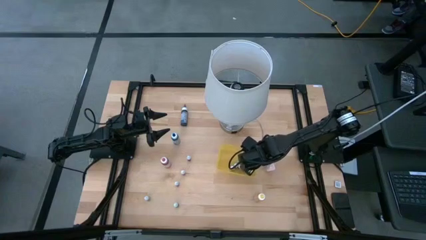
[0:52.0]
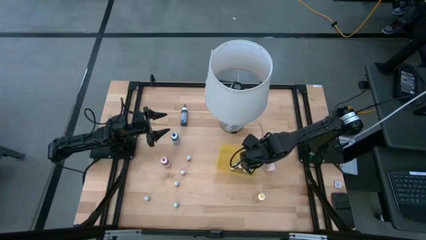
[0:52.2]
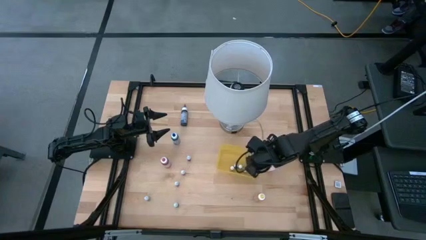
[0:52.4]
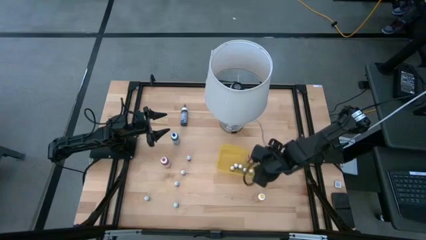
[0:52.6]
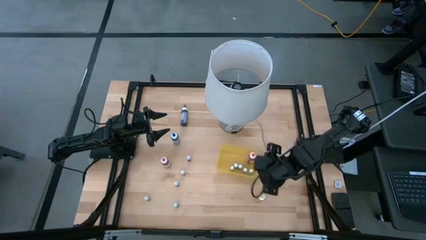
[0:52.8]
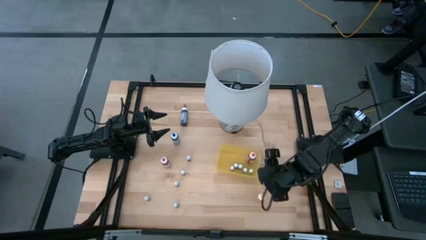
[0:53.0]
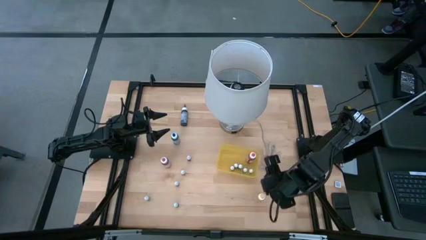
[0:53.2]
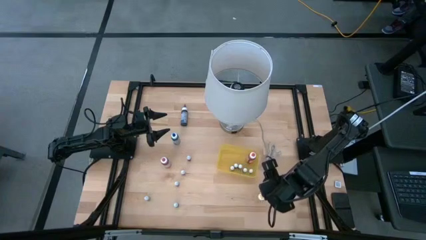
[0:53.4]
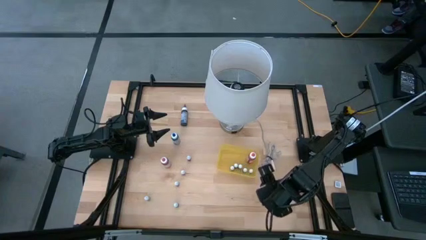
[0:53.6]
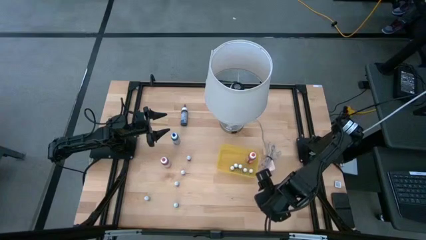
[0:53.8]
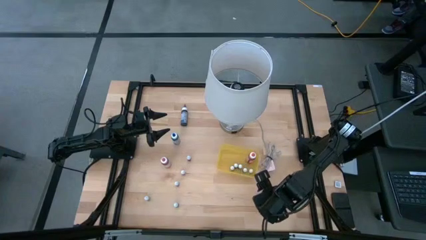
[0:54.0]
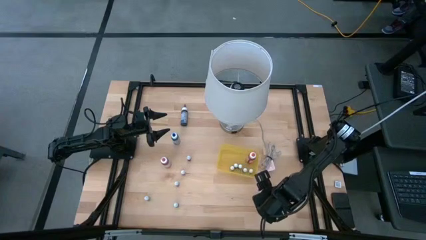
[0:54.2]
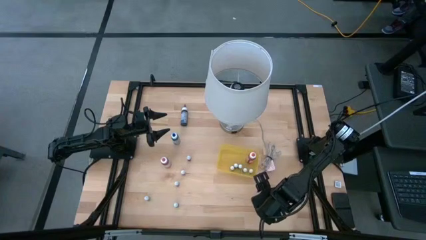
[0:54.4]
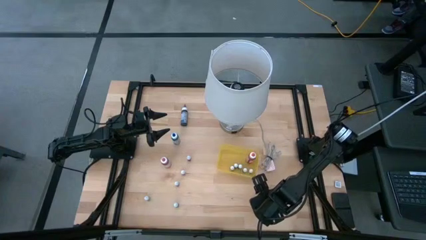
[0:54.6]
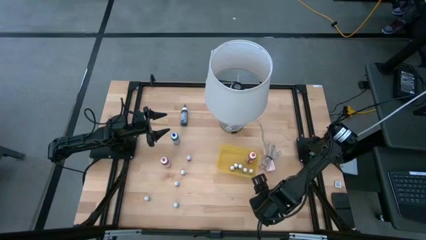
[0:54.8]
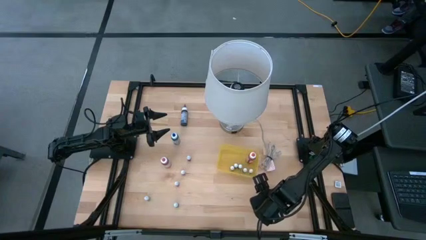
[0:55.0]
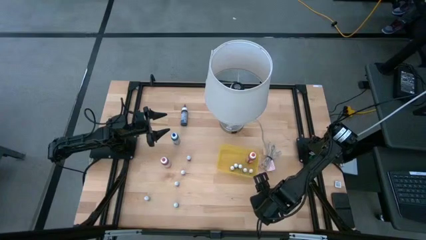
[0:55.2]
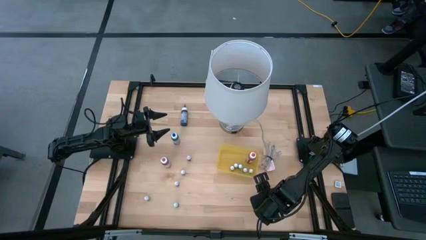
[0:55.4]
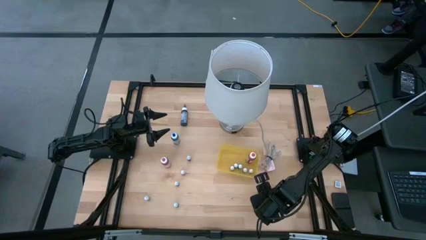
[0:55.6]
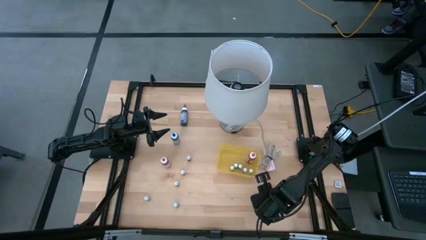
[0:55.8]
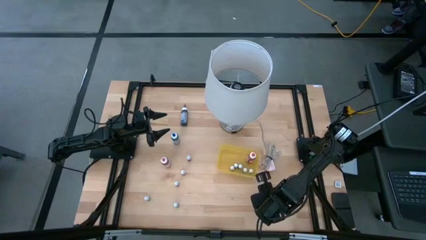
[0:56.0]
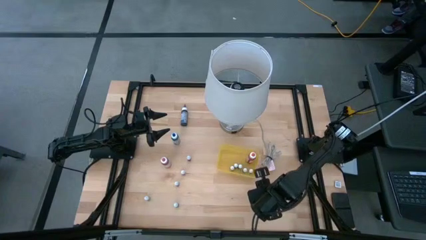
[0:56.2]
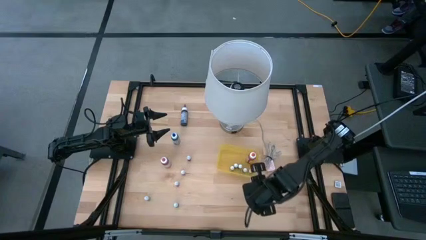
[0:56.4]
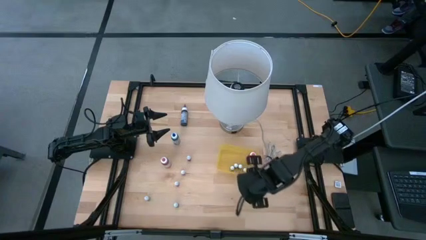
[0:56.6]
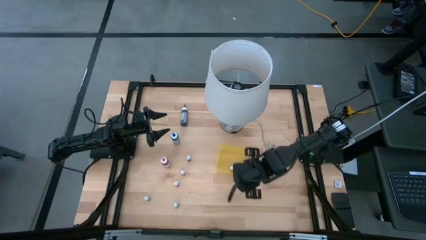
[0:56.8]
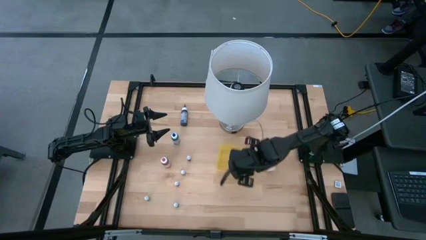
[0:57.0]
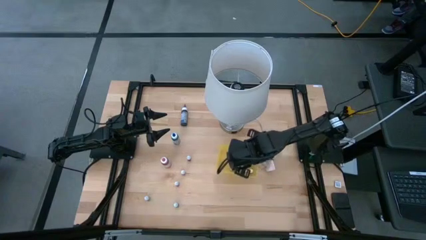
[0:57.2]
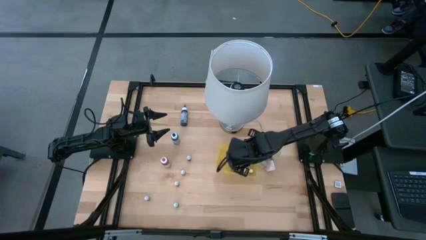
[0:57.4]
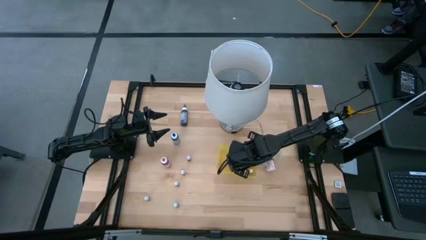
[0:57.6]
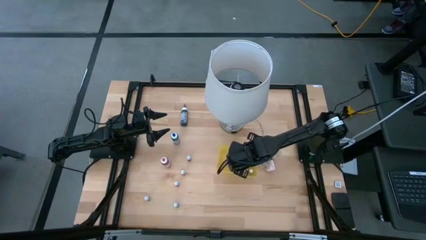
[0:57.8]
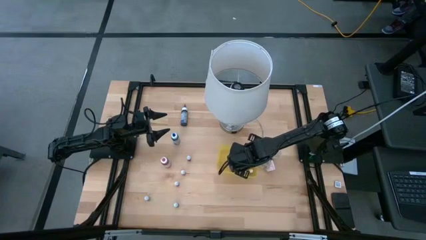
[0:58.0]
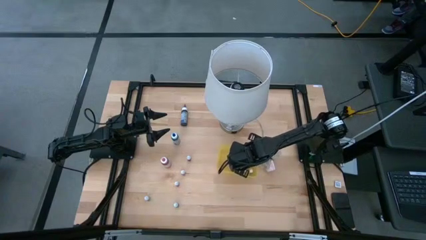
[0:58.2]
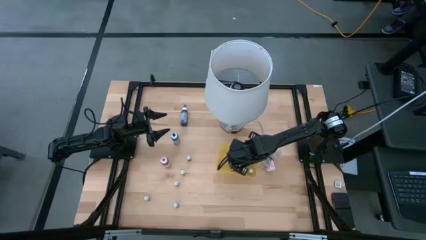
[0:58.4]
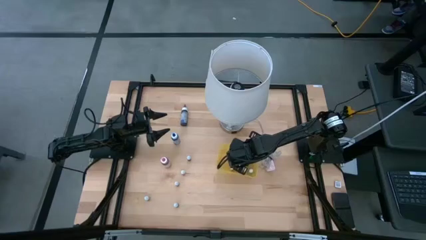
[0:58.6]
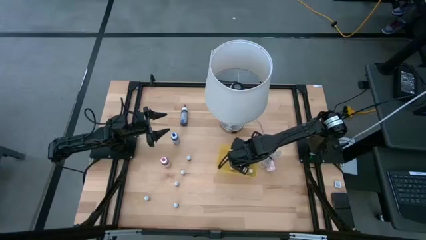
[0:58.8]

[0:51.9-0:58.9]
Task: Pick & Place food coloring
Put the yellow food coloring bottle into the yellow bin

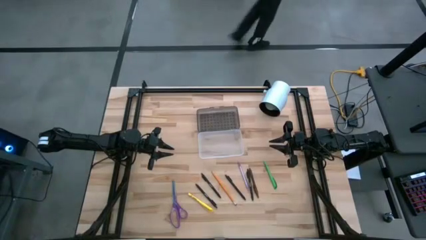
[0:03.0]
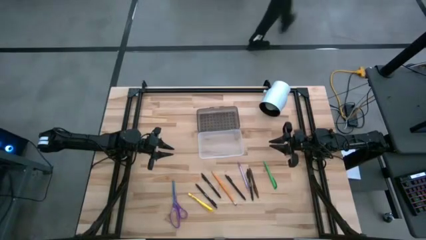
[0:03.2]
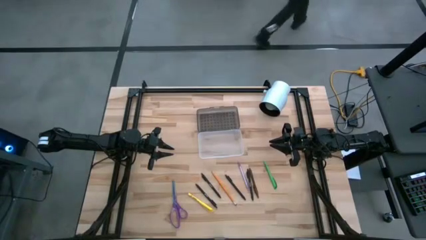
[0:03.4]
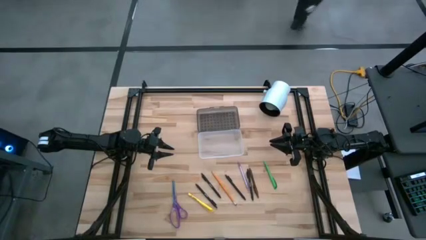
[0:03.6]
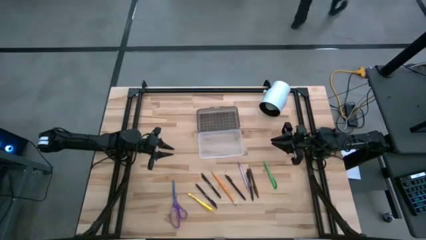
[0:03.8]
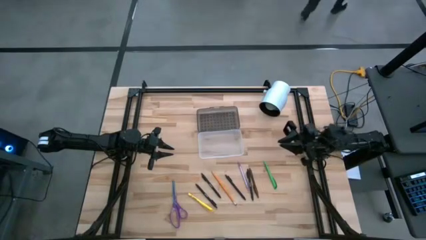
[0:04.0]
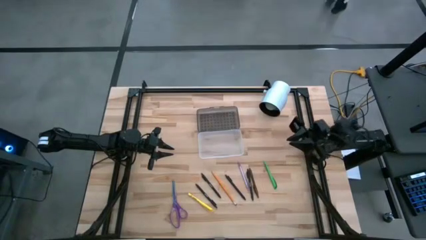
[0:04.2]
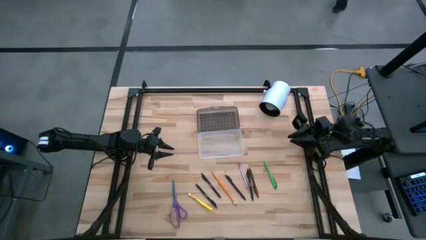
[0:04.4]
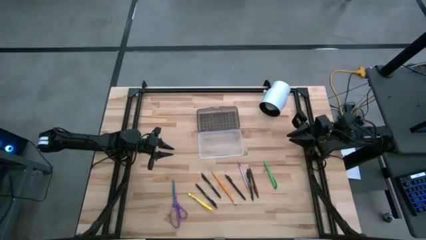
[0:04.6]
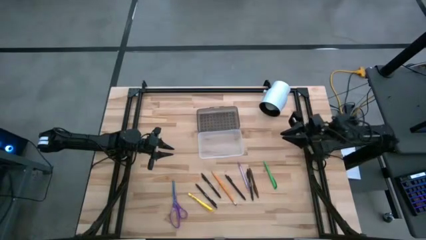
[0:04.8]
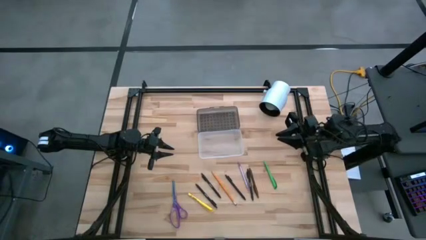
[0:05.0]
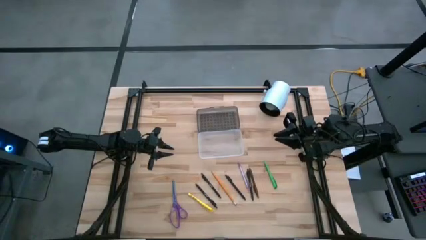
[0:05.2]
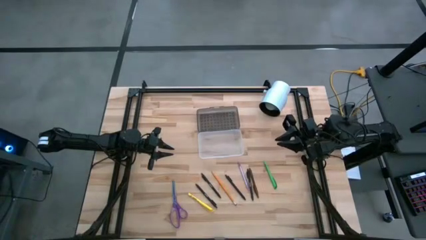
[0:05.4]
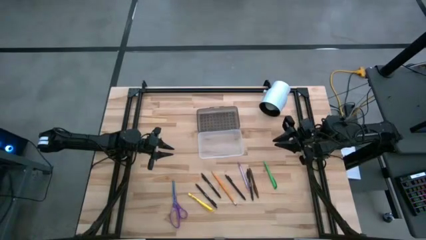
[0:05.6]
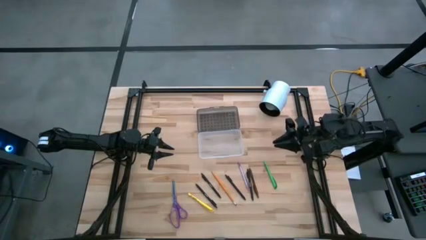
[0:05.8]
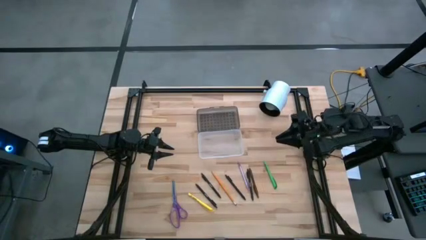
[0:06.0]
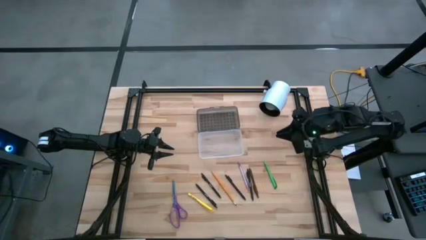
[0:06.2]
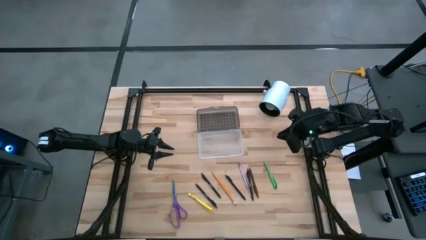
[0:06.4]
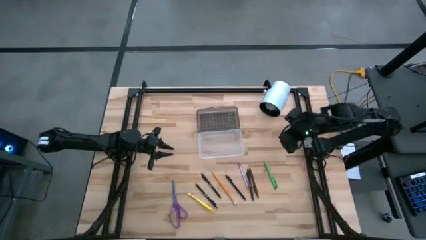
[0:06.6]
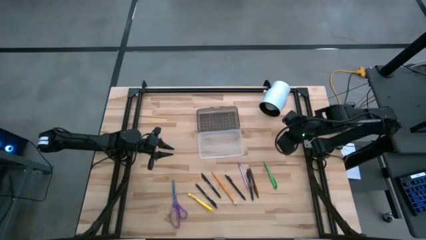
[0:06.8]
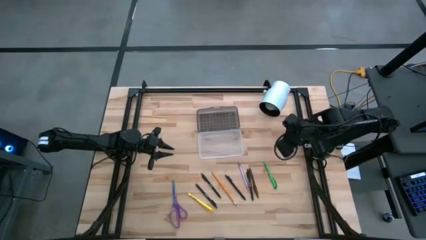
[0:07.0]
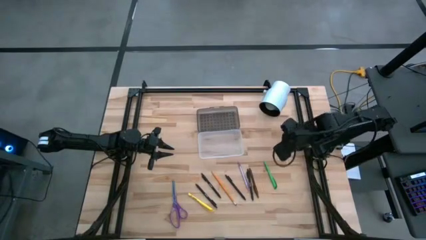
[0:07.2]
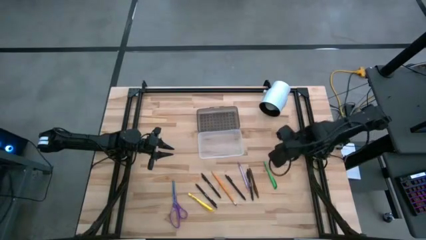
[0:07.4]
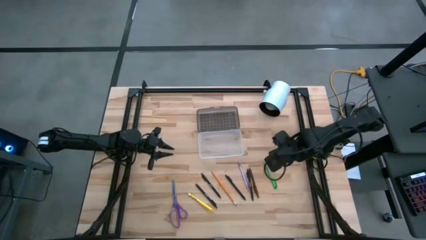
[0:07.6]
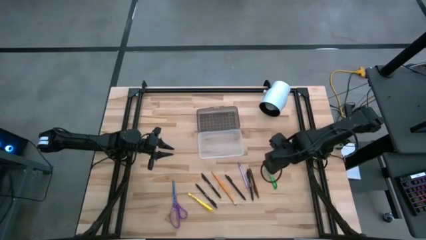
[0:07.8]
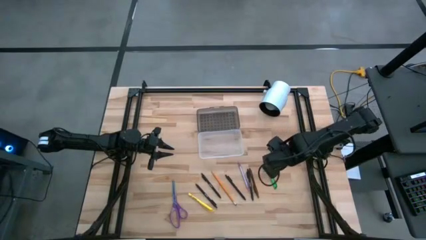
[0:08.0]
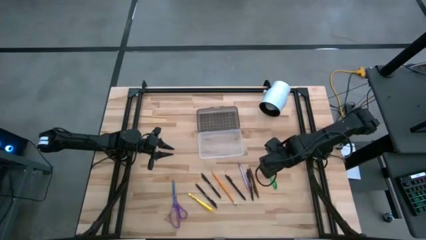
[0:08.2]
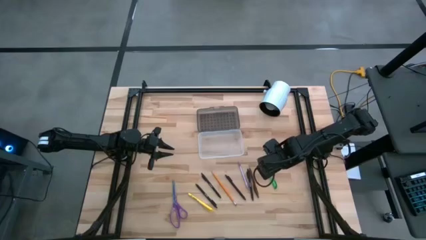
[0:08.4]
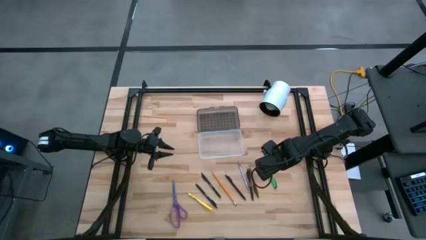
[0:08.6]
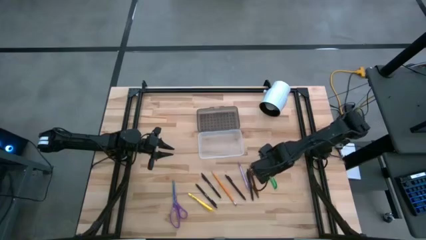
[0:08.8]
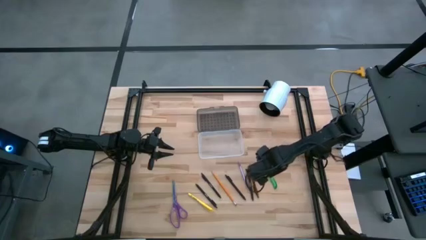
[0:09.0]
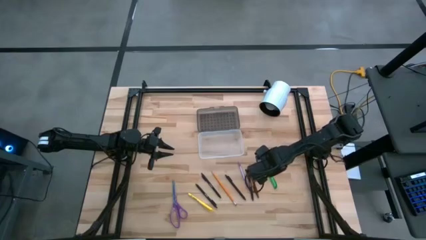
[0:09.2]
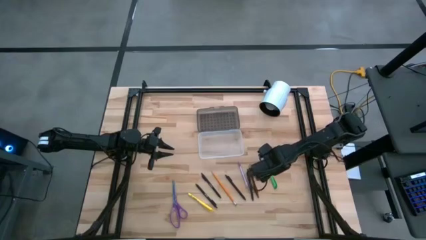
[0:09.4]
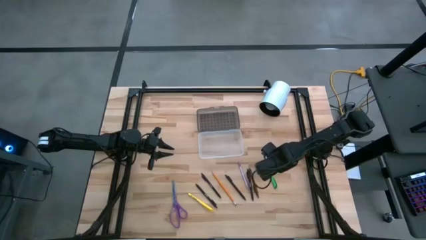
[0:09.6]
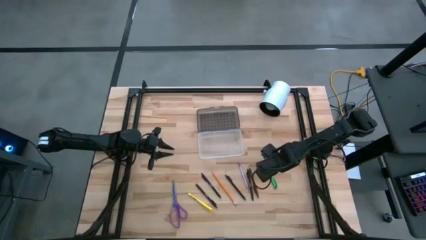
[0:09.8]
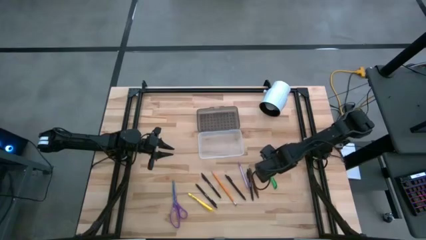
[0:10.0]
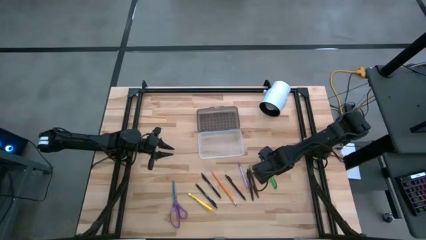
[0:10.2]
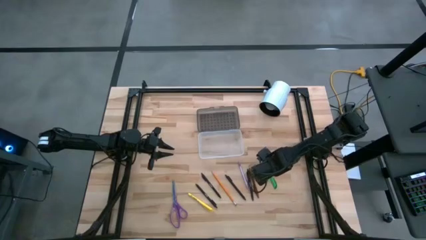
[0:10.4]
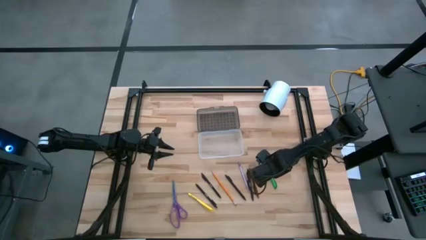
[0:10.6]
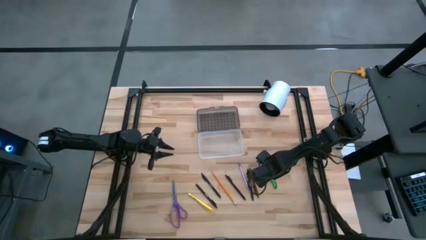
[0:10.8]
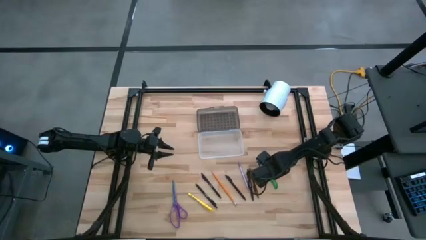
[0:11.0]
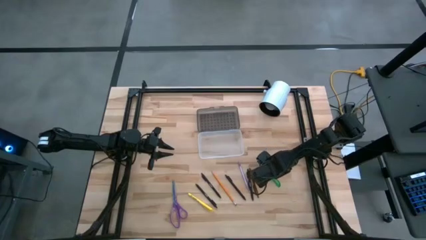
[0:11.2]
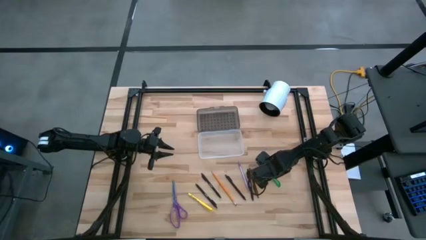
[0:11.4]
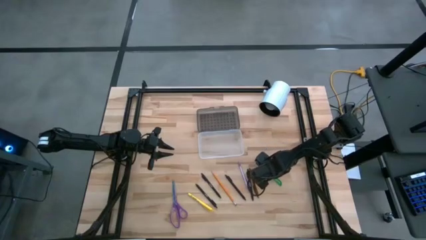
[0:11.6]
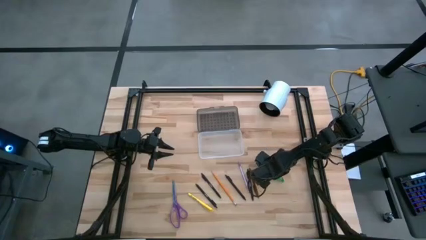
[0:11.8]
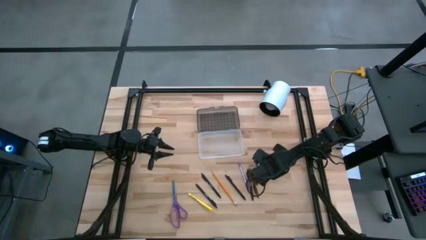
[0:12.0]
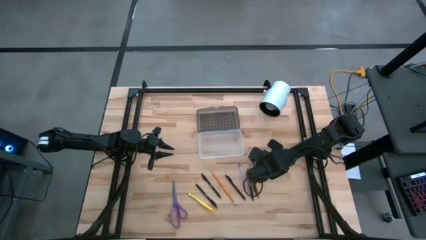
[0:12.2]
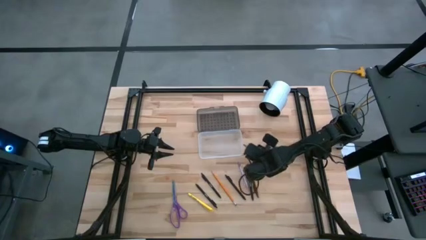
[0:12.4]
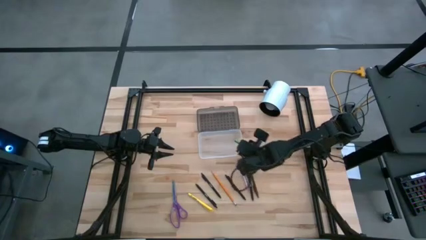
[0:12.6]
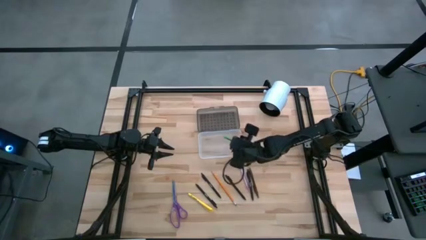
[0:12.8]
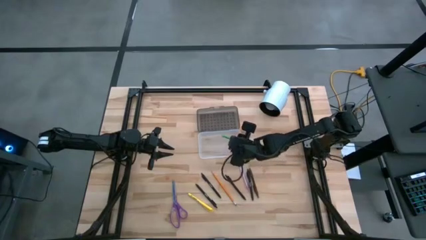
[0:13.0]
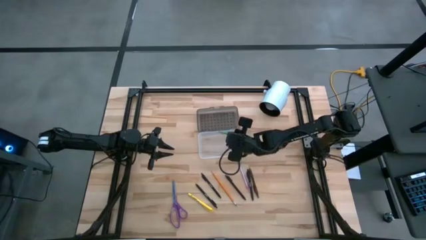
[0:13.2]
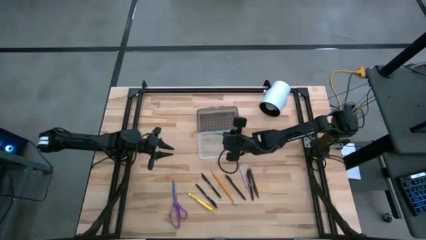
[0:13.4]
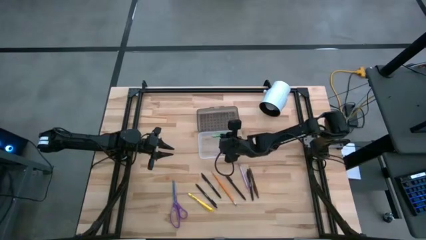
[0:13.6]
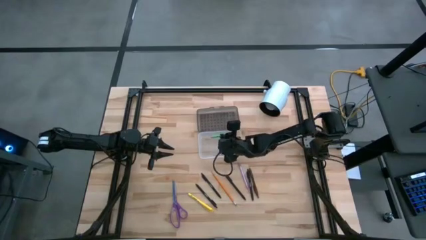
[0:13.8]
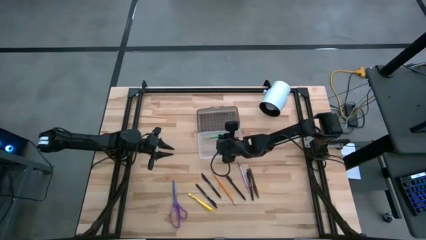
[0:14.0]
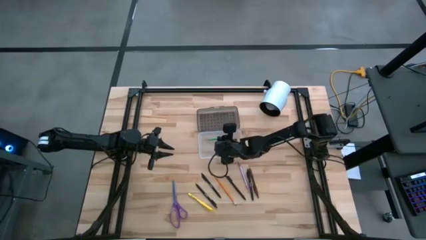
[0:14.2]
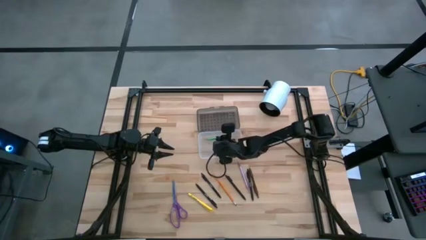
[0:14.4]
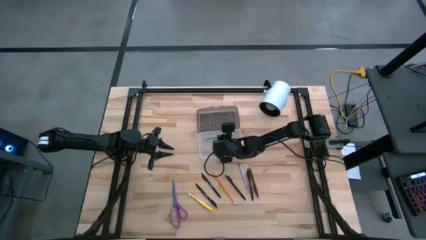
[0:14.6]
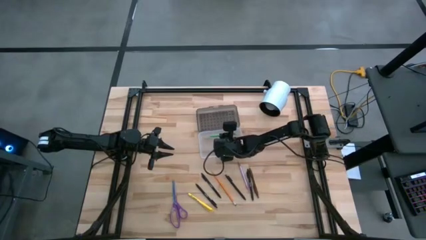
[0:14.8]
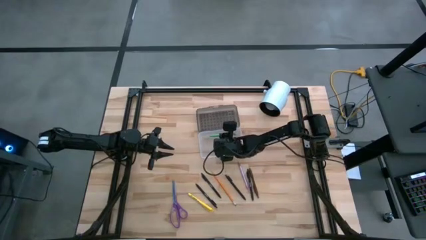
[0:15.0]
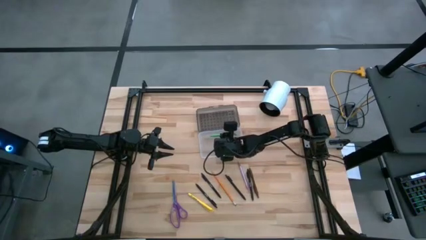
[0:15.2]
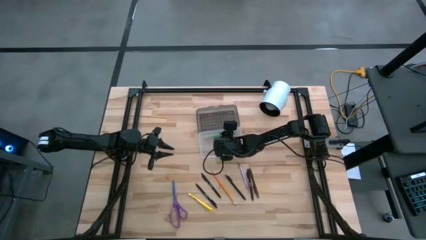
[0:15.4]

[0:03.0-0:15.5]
Task: Pick & place school supplies into a supply box
Put the green marker into the transparent supply box
